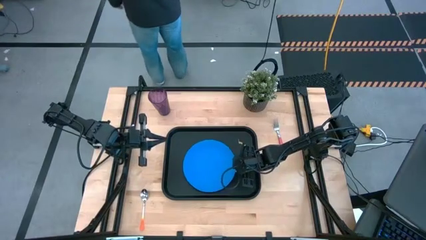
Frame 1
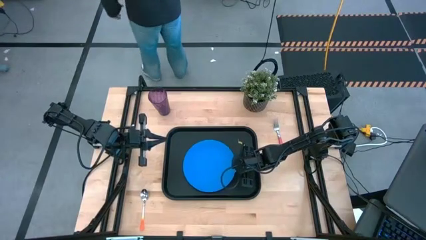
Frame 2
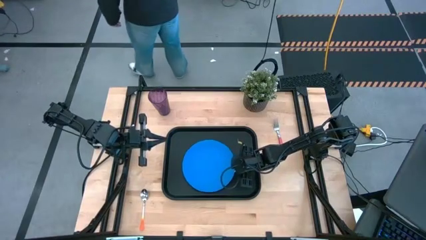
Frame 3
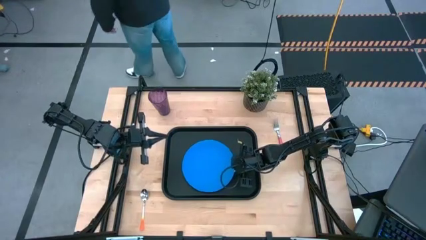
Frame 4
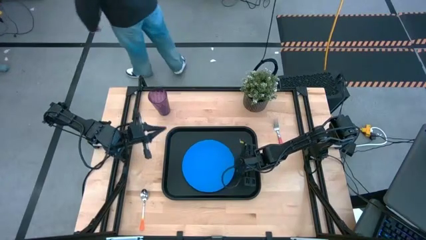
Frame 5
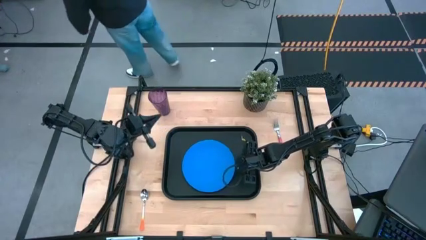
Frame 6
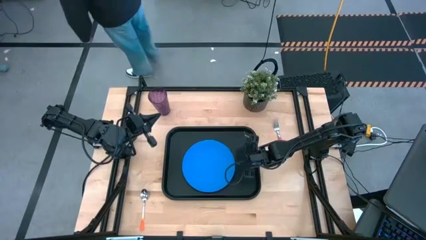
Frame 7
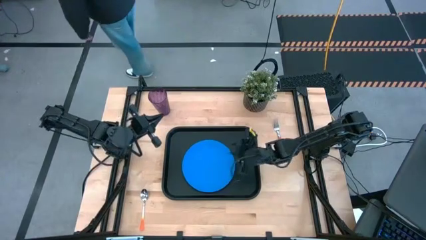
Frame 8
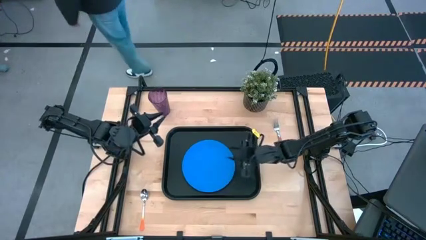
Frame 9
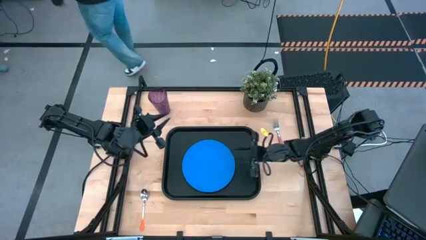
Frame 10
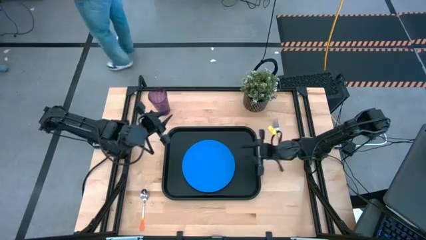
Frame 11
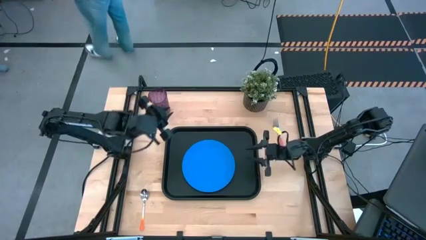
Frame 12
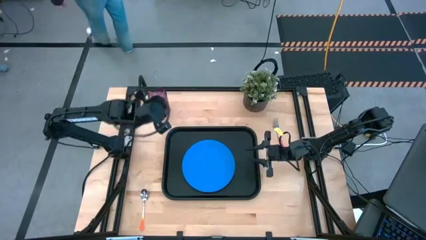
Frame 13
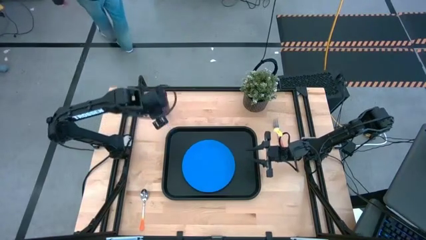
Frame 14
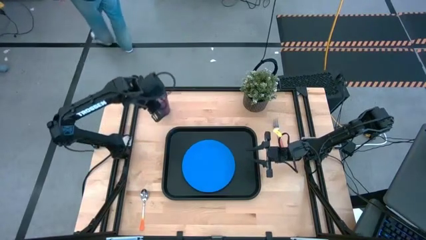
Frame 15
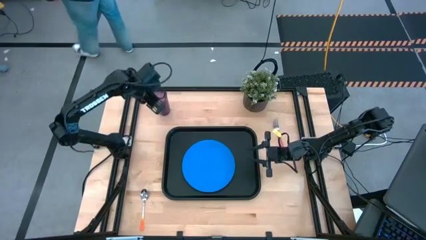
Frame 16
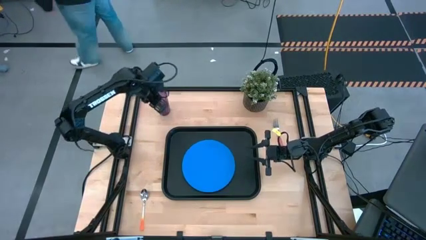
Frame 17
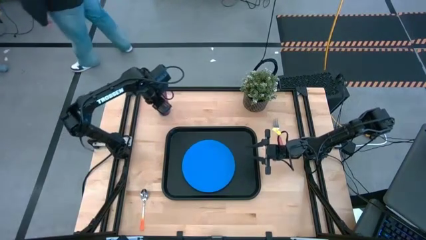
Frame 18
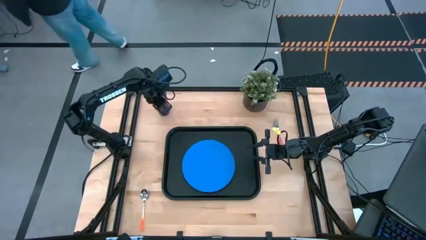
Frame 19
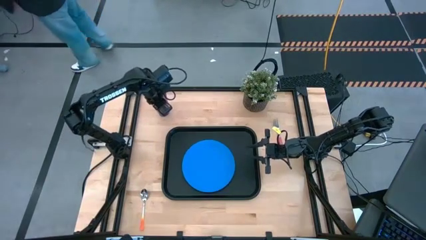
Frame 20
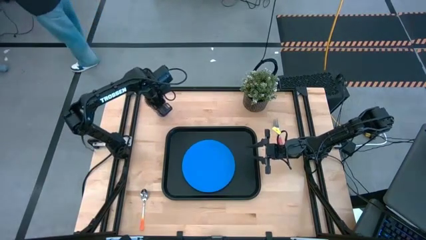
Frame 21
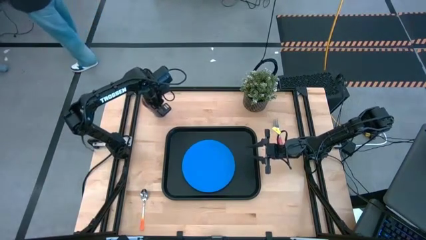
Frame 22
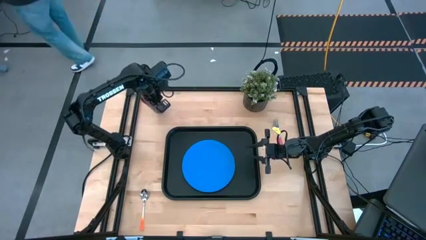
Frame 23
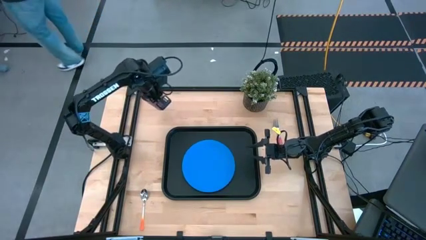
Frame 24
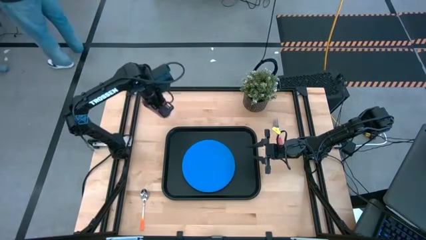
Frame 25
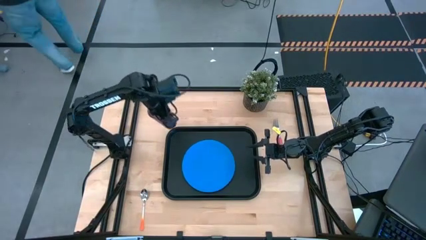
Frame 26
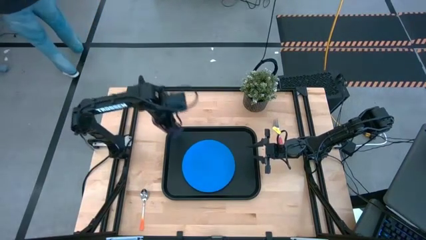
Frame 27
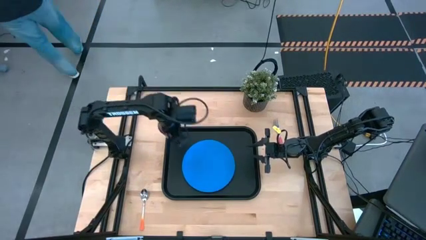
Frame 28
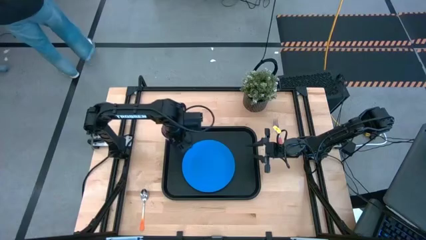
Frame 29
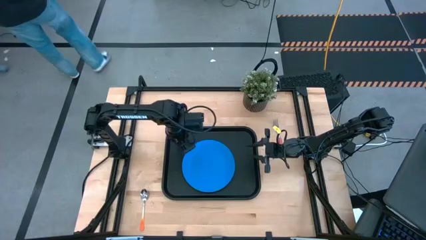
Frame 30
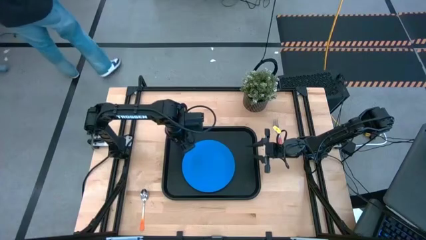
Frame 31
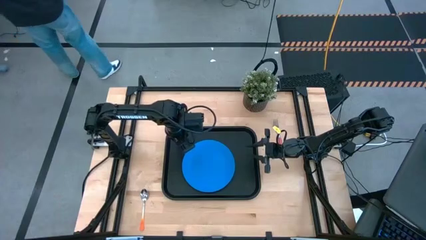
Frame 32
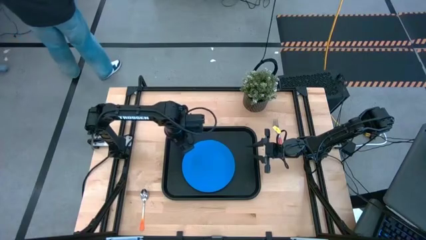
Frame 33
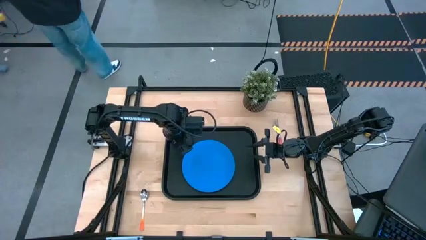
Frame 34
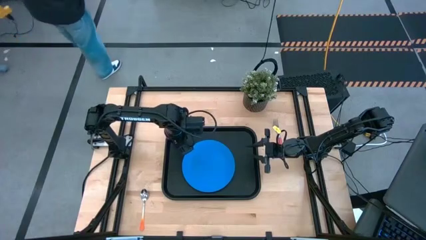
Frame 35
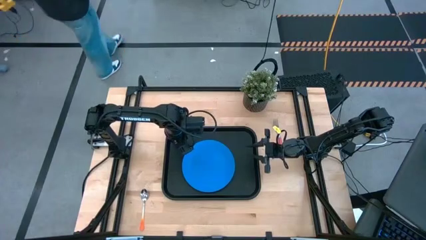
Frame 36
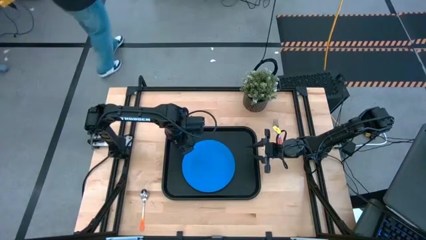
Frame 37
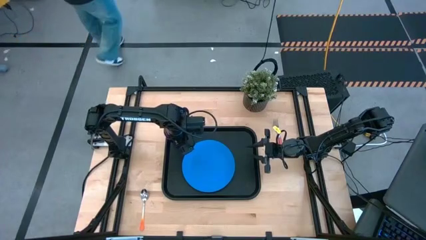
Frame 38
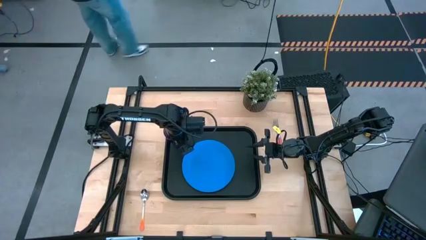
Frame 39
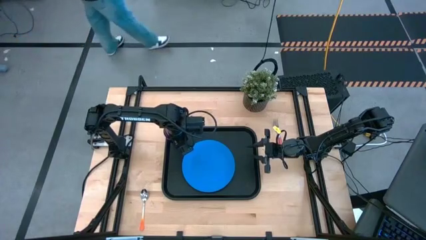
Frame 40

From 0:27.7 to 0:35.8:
Task: Pick and place plate/cup/fork/spoon on tray
Put the violet cup on the black serving tray to the top left of the blue plate

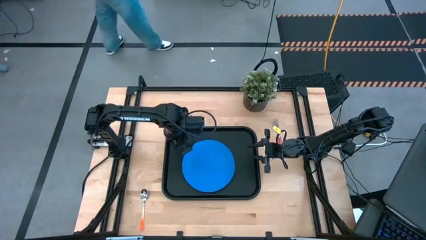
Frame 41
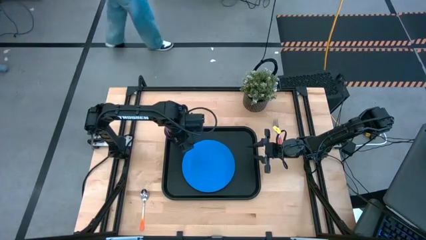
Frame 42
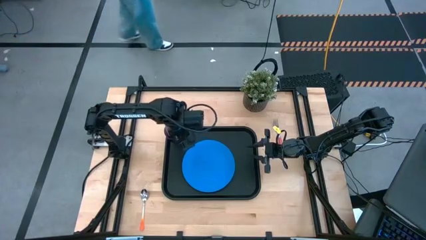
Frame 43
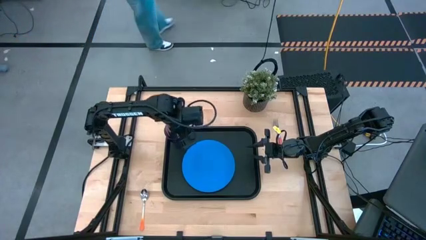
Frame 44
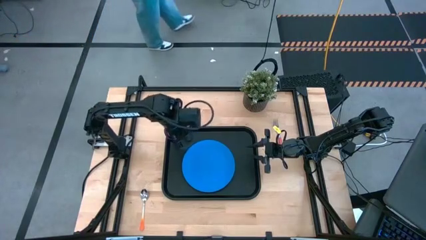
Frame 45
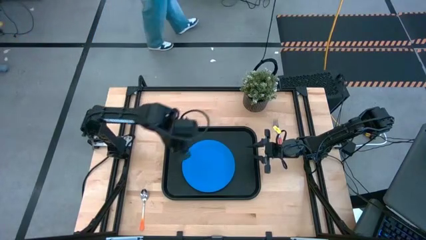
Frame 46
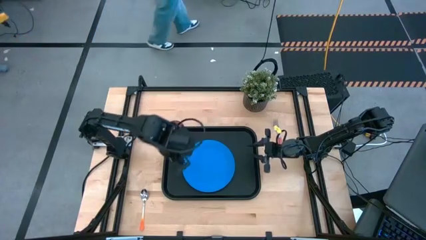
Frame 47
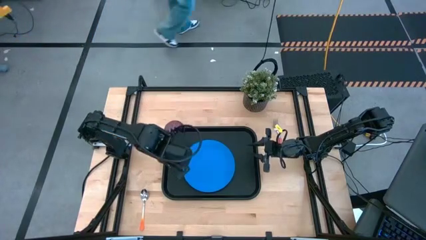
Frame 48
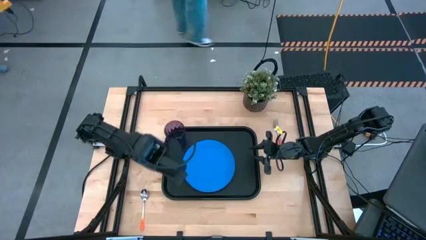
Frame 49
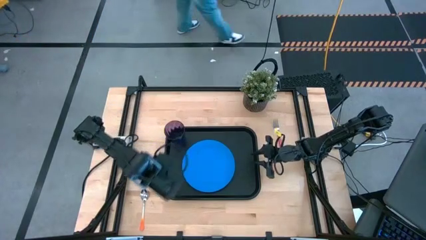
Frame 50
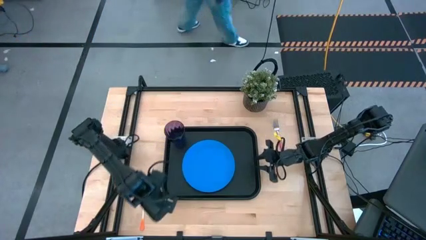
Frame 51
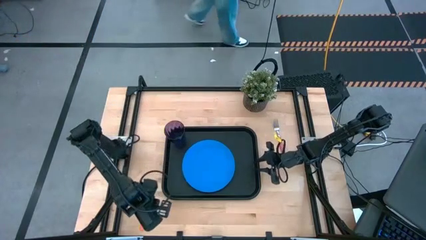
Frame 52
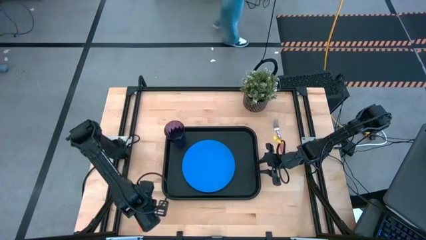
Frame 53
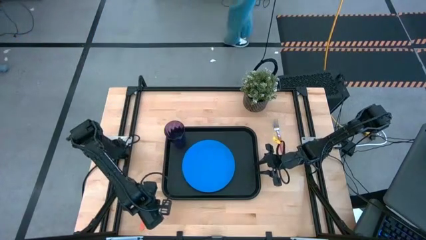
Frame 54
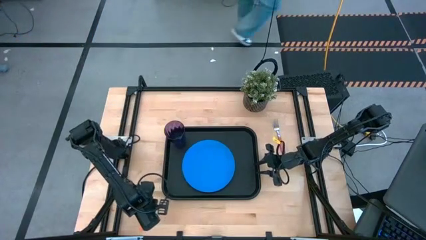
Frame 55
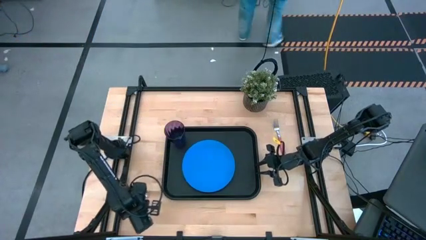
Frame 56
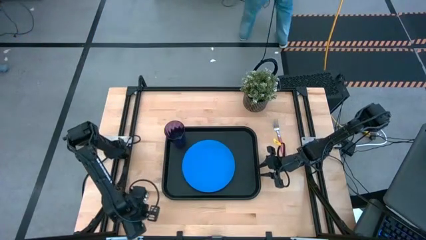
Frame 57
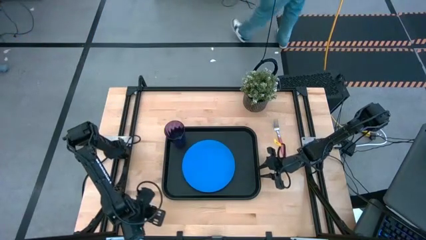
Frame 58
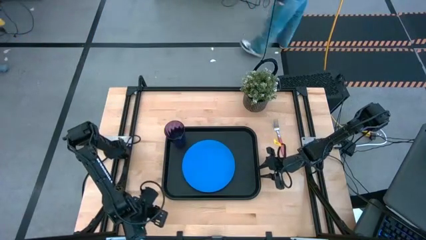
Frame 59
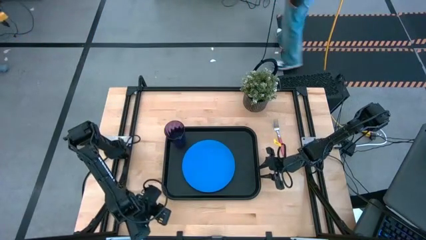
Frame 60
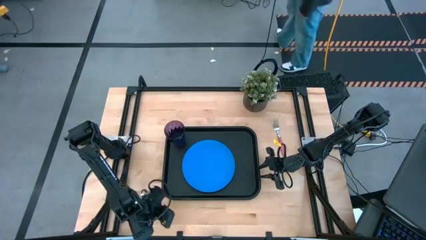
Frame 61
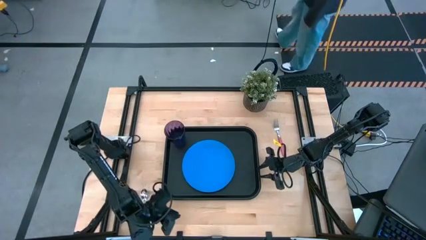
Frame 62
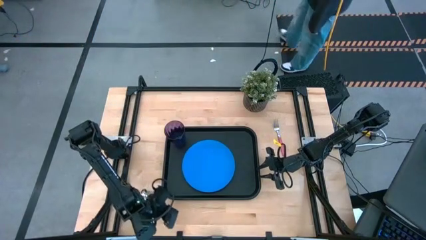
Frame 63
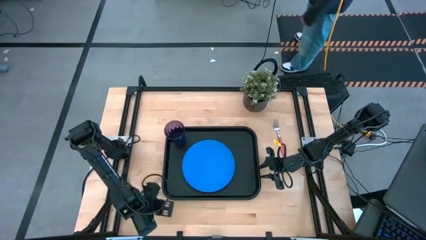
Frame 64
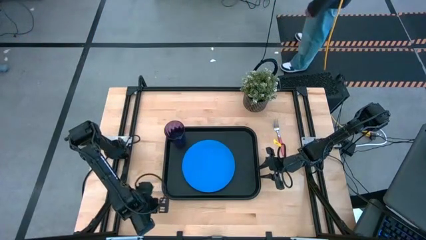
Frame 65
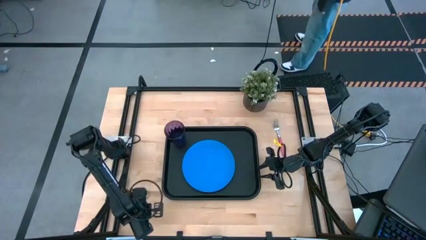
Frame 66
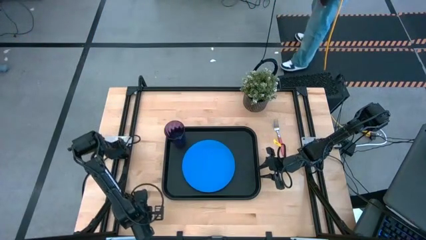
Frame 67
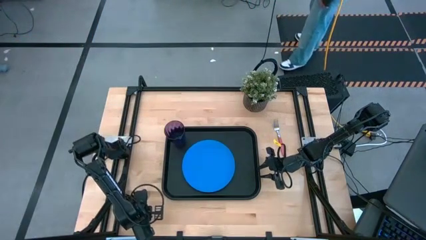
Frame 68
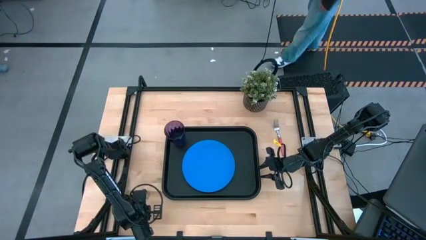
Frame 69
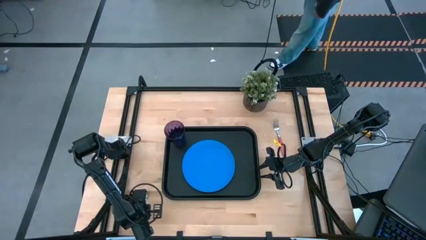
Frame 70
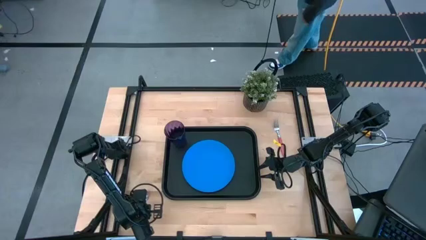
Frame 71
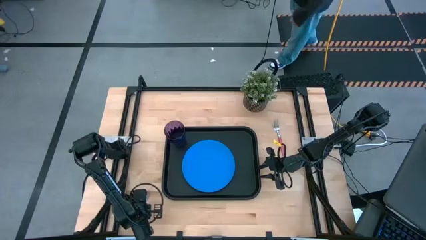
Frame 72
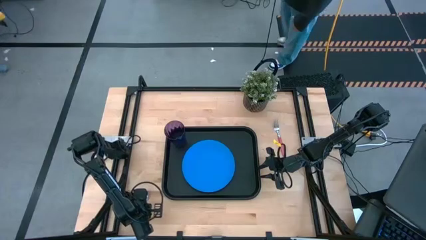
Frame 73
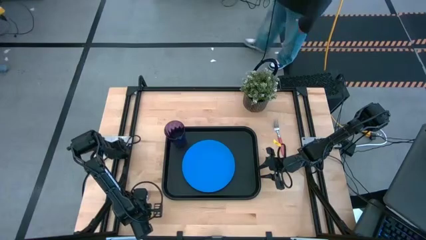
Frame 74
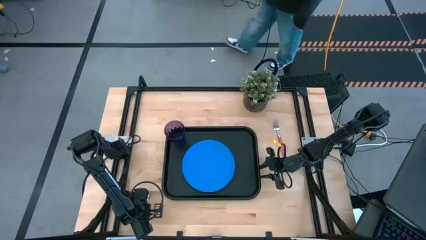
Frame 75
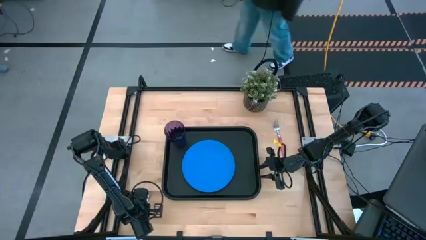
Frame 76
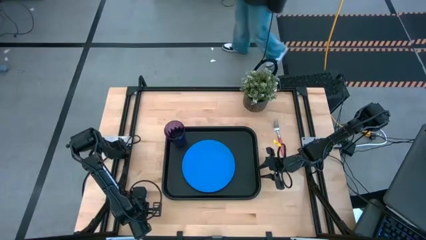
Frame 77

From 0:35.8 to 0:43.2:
Put the orange spoon on the black serving tray to the right side of the blue plate
